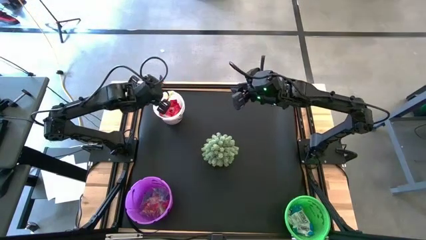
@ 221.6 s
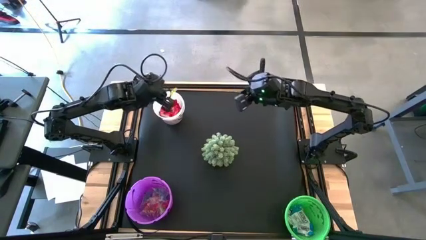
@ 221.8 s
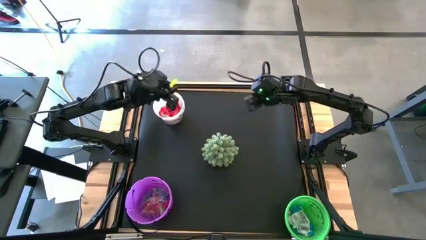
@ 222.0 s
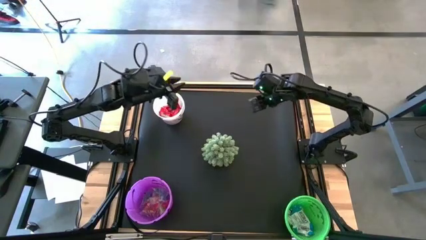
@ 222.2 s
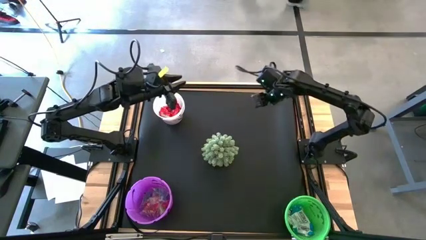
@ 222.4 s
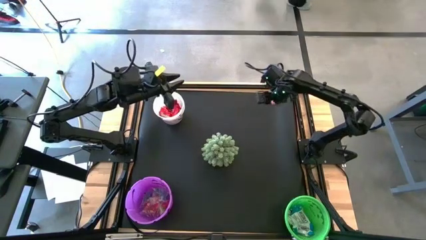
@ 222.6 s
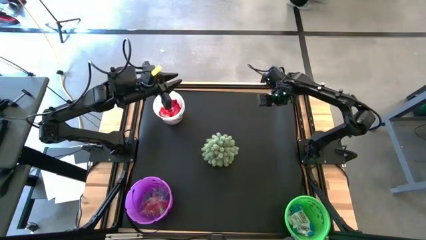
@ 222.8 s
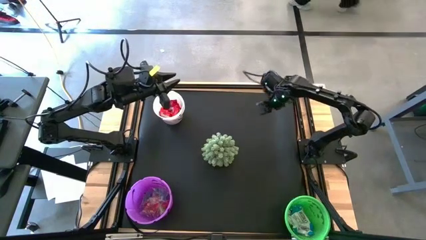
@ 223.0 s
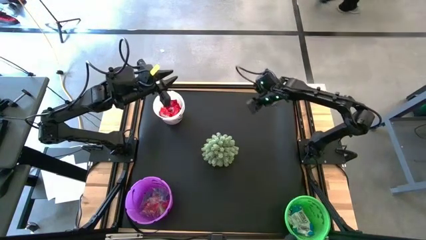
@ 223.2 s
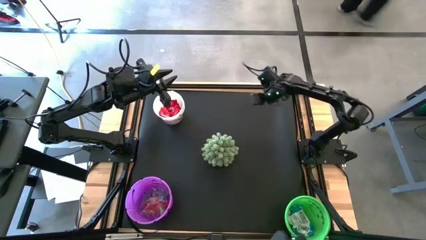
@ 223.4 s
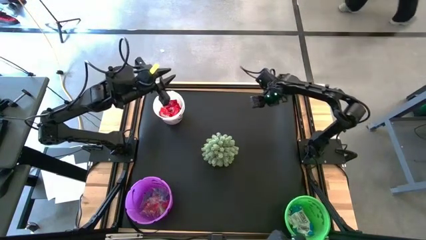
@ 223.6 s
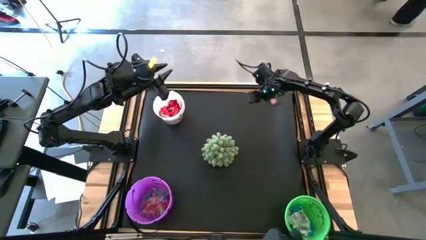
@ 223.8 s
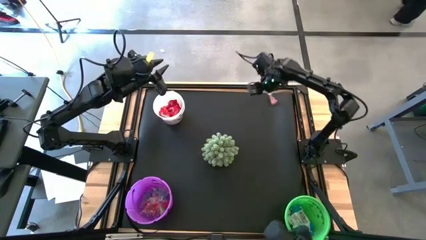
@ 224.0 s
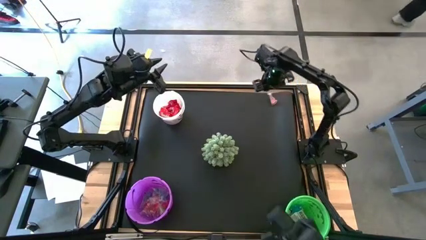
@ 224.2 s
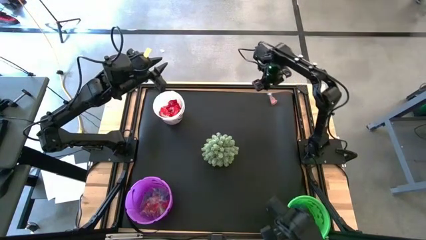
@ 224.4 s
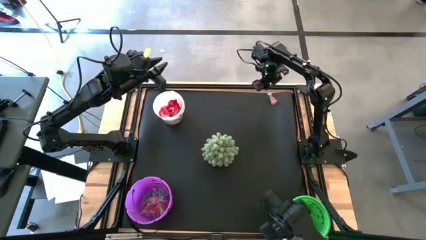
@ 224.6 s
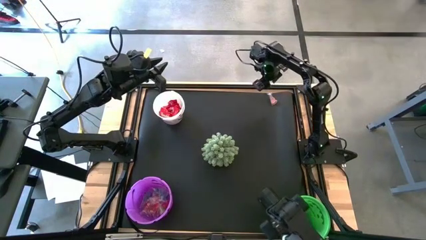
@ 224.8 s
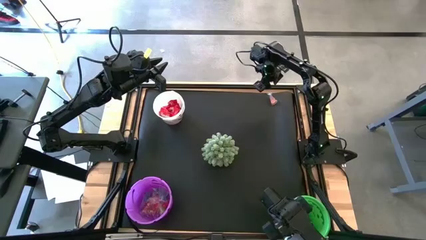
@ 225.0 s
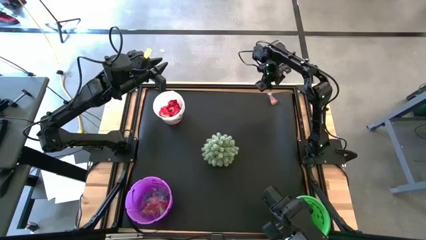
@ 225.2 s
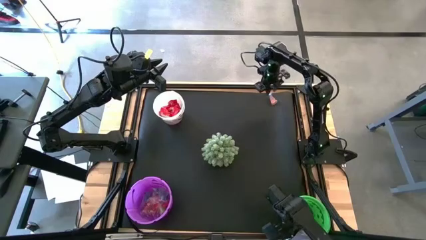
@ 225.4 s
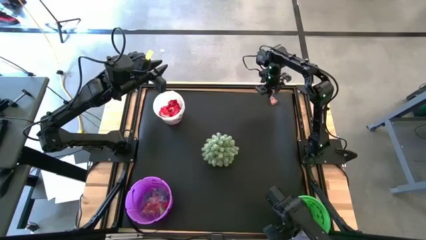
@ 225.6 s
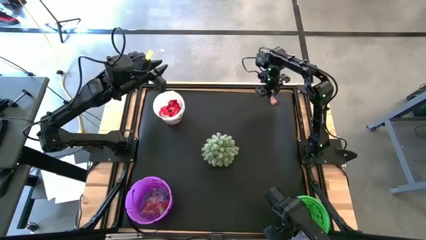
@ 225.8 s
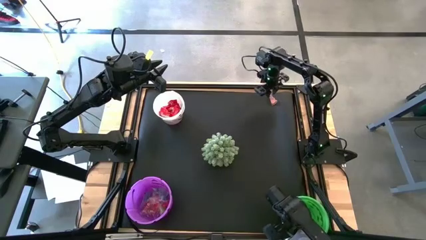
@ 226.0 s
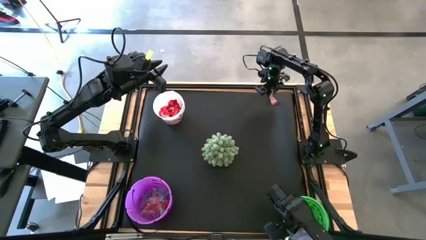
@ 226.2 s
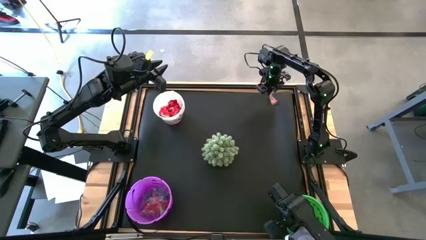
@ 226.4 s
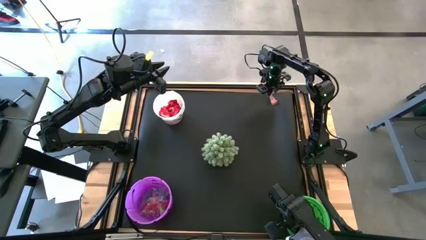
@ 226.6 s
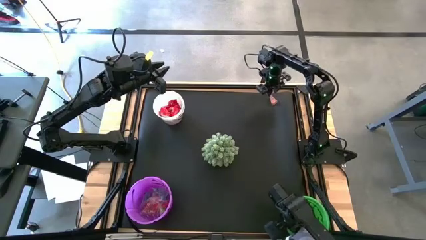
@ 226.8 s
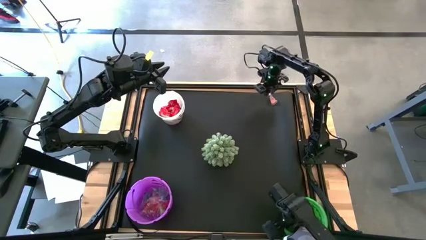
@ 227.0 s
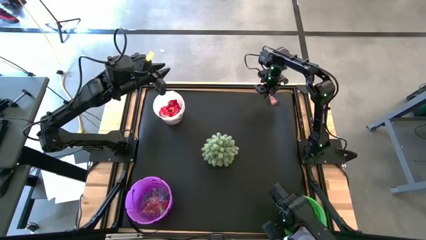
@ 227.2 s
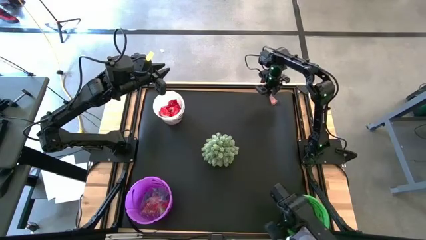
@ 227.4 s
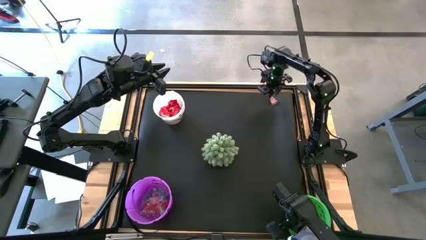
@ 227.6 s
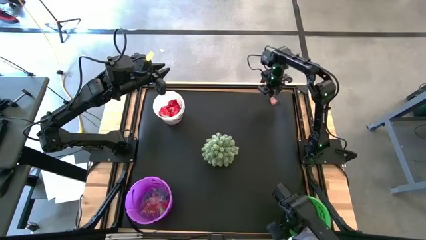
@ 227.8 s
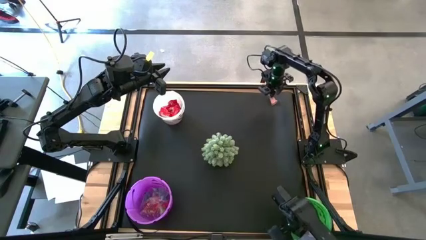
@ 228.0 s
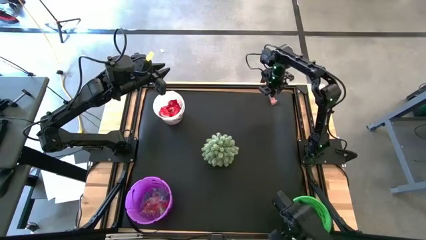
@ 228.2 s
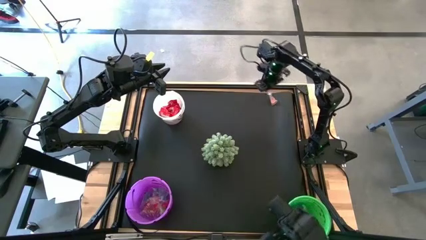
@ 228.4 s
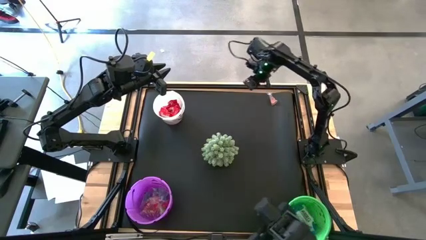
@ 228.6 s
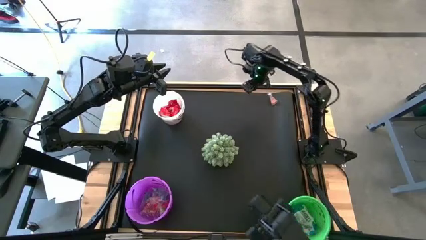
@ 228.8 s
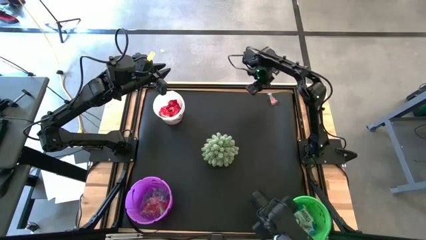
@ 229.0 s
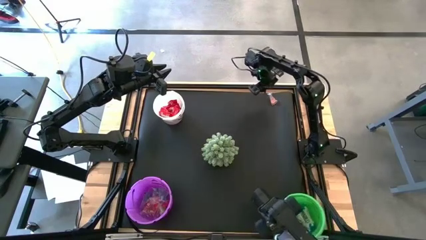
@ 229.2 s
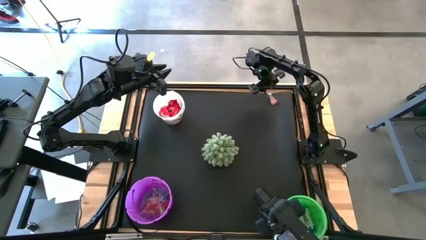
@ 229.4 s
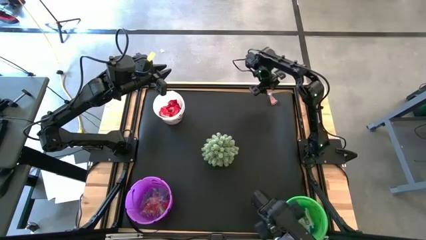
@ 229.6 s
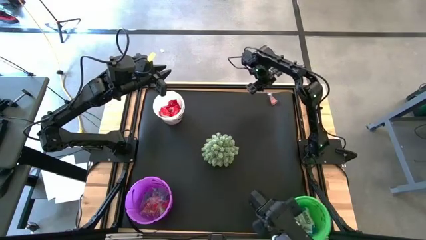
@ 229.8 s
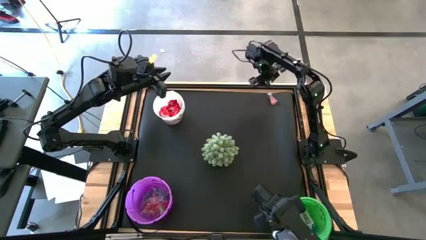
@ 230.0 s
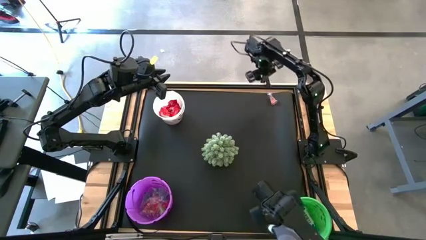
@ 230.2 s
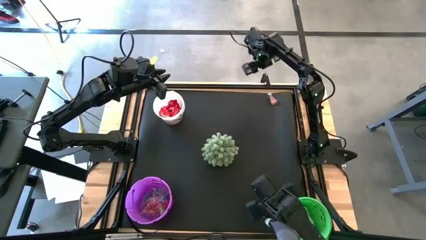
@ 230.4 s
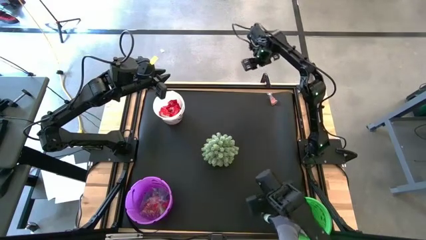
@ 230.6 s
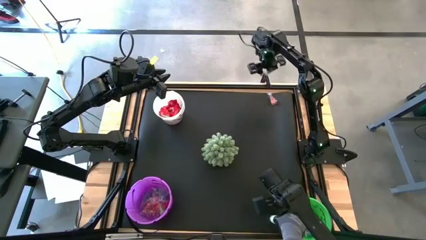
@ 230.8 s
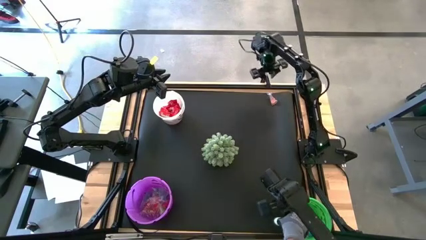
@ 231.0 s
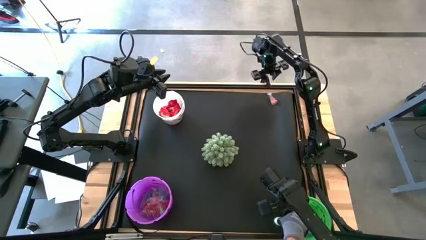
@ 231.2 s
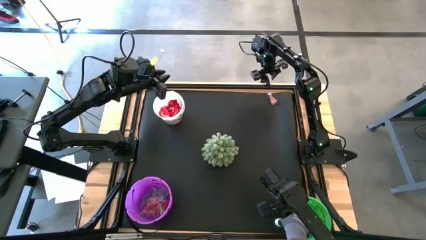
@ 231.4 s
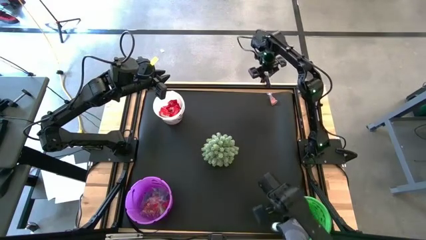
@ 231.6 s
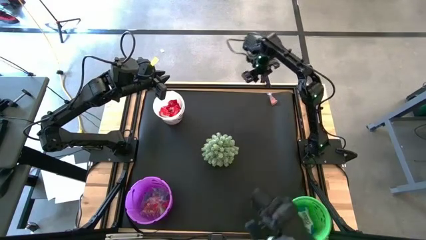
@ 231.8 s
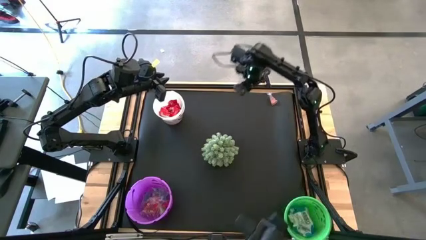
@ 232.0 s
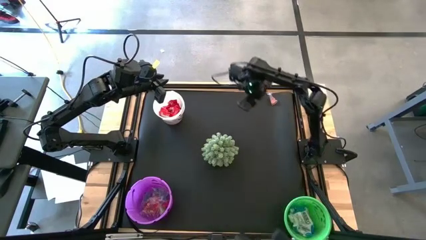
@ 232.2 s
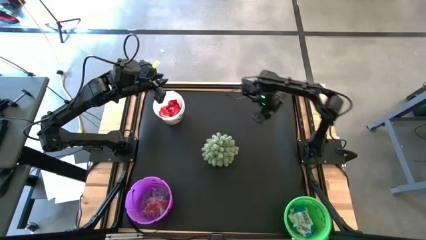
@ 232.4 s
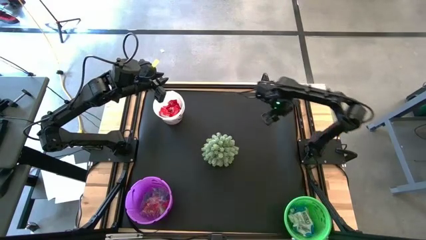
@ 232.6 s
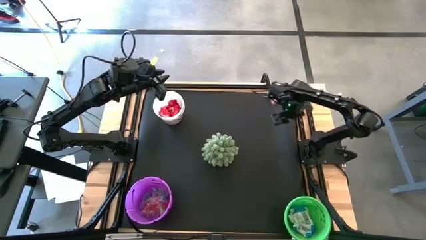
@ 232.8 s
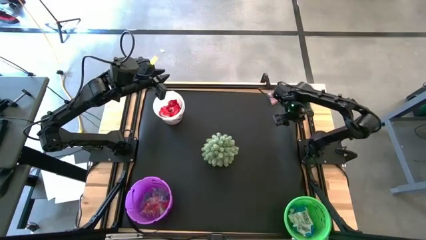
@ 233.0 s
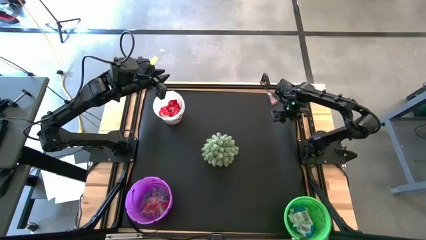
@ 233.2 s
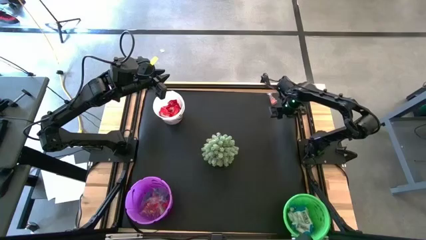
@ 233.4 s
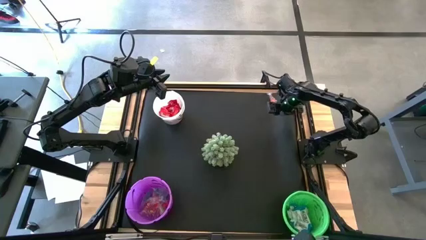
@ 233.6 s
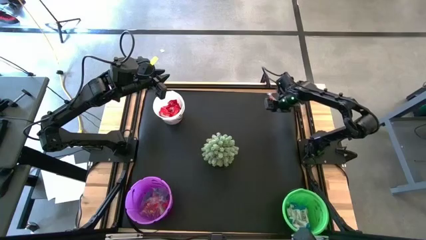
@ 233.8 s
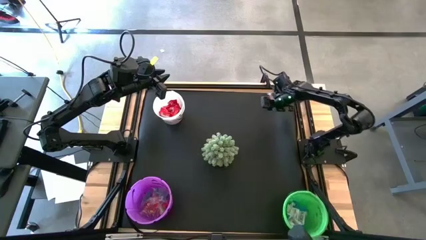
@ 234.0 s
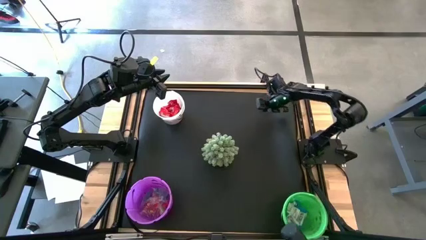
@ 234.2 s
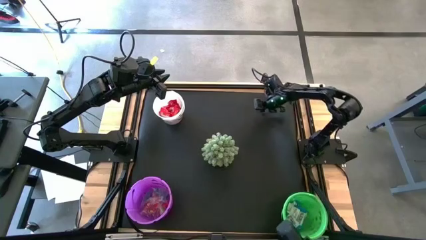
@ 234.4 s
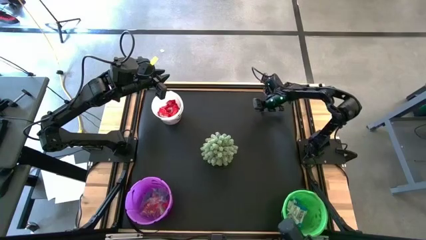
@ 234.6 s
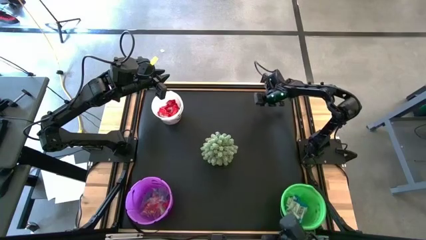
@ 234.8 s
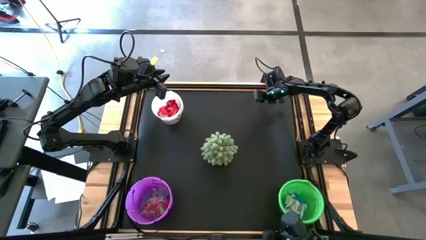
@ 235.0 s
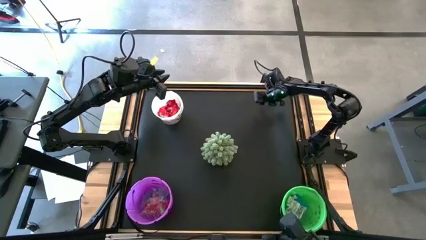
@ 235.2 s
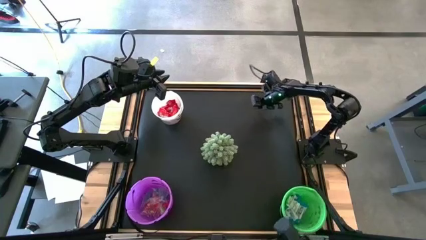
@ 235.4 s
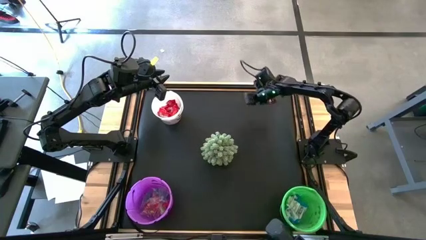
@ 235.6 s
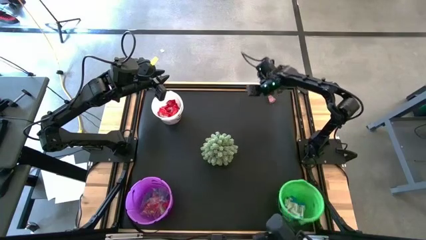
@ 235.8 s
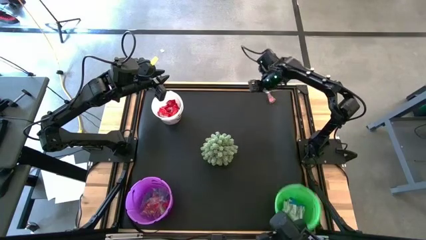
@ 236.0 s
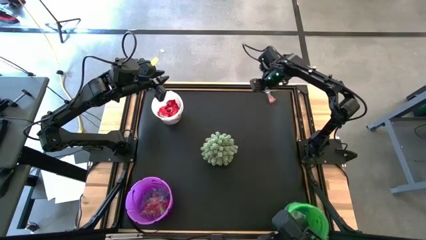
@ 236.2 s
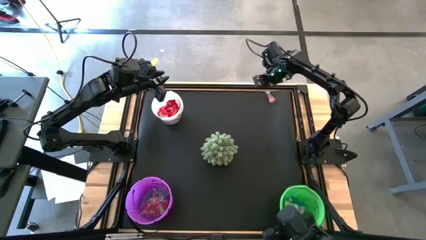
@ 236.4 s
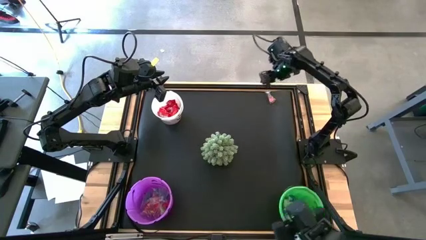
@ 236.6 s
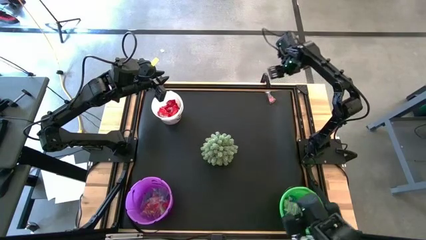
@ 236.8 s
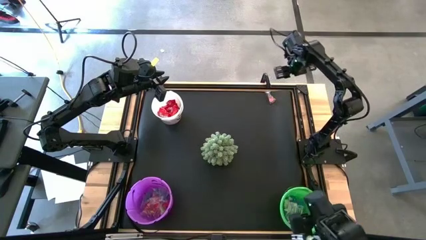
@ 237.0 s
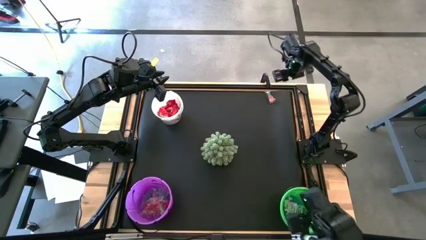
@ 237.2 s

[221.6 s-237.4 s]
Task: Organize candy in baskets
Adjust the green bucket on the table
